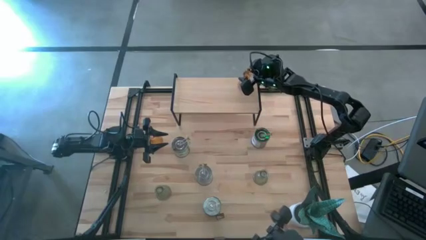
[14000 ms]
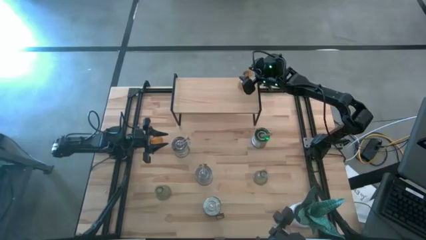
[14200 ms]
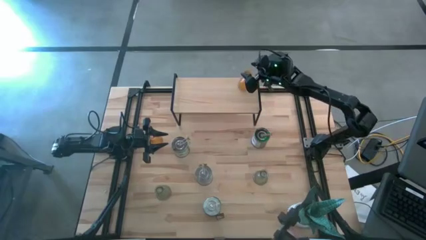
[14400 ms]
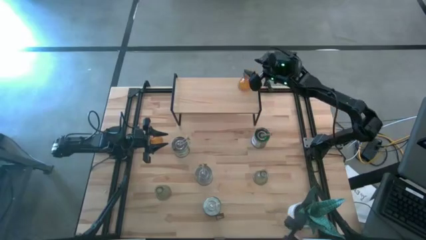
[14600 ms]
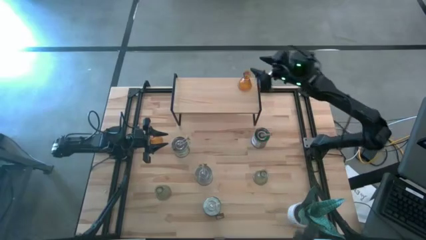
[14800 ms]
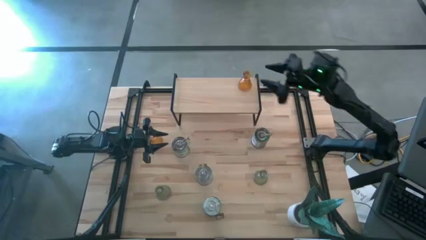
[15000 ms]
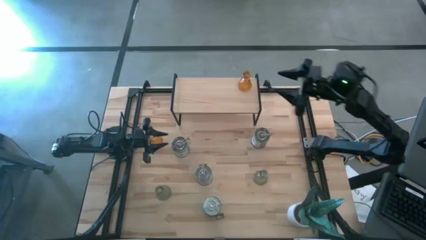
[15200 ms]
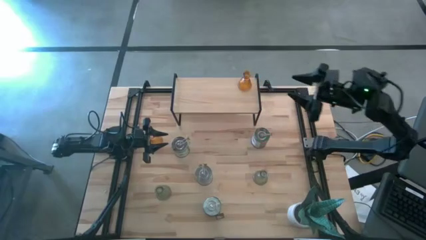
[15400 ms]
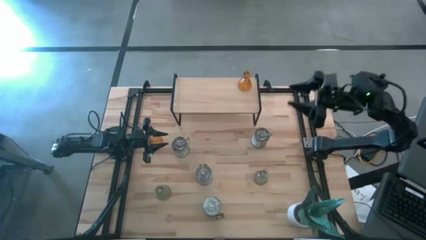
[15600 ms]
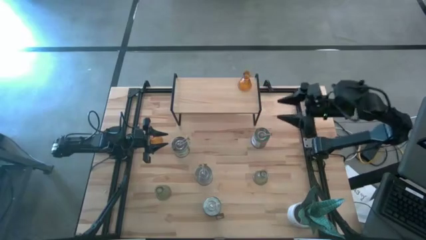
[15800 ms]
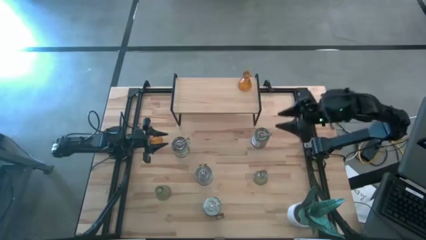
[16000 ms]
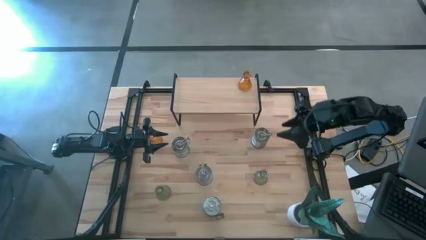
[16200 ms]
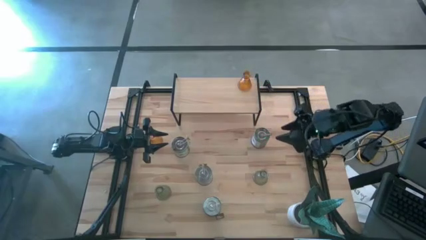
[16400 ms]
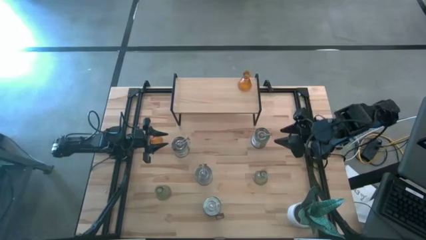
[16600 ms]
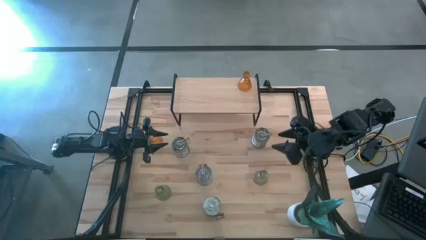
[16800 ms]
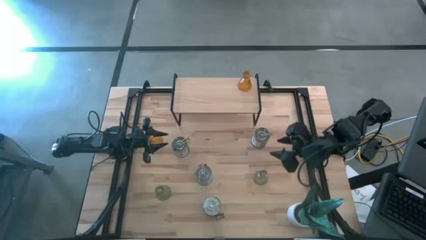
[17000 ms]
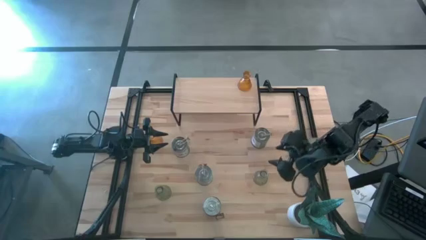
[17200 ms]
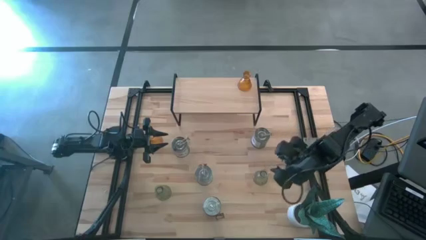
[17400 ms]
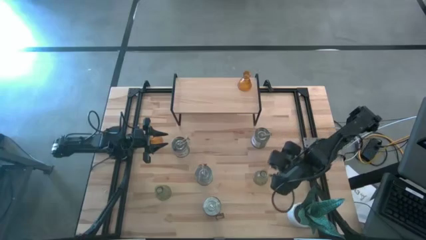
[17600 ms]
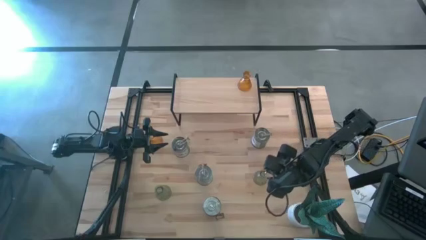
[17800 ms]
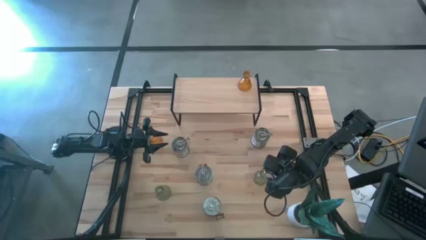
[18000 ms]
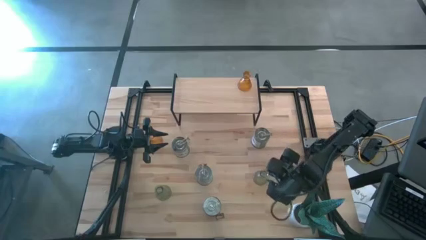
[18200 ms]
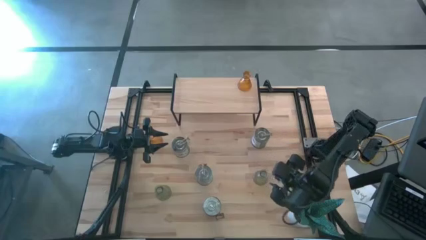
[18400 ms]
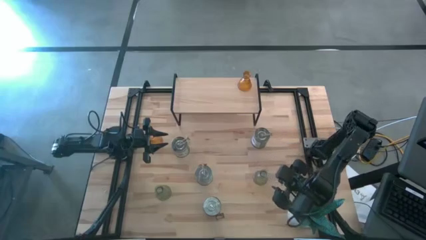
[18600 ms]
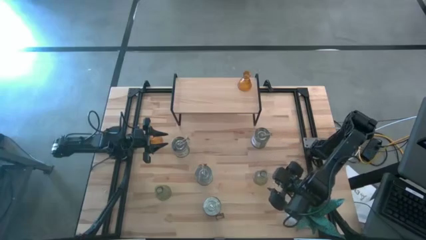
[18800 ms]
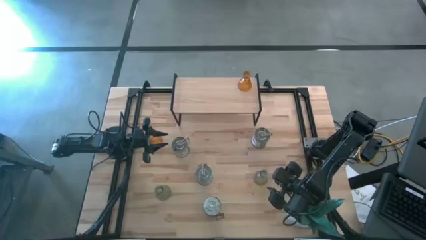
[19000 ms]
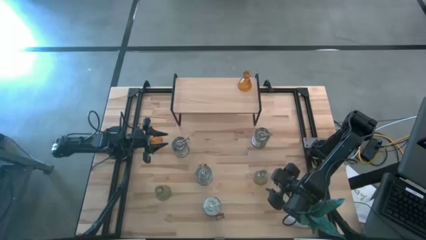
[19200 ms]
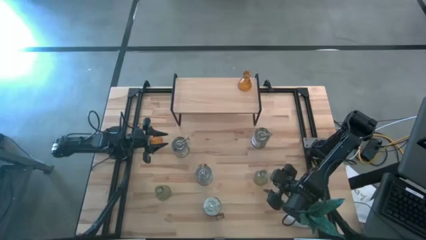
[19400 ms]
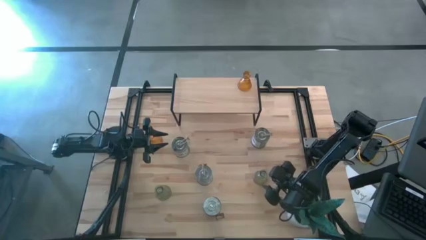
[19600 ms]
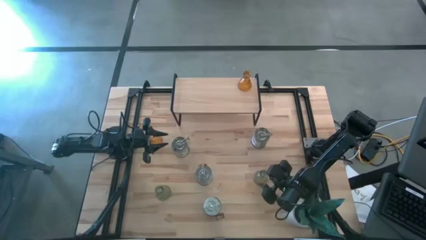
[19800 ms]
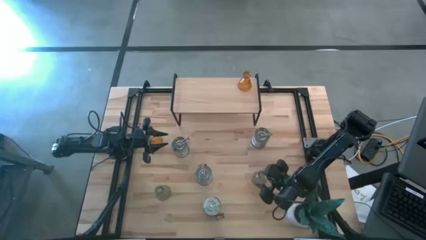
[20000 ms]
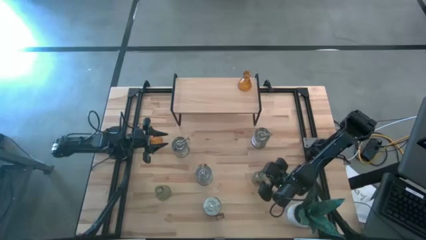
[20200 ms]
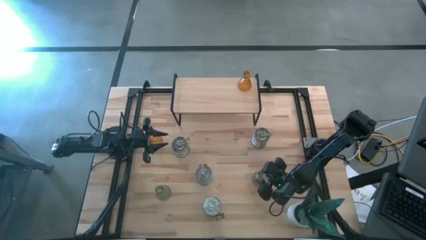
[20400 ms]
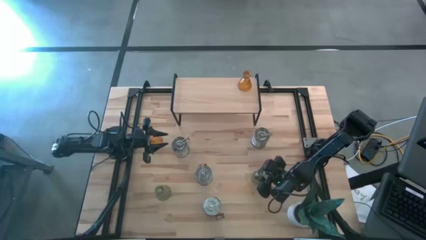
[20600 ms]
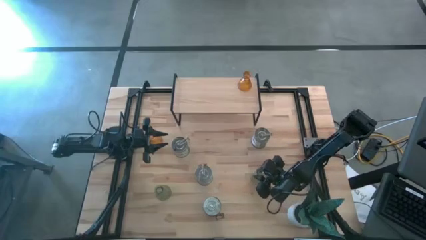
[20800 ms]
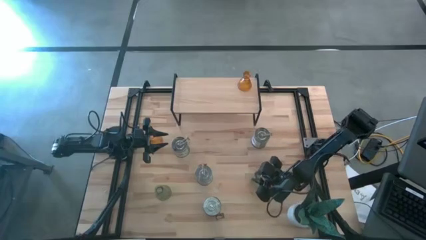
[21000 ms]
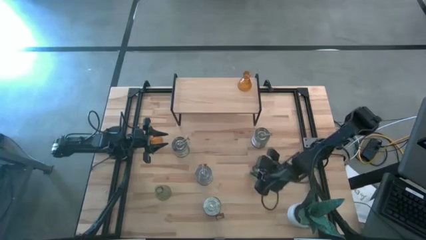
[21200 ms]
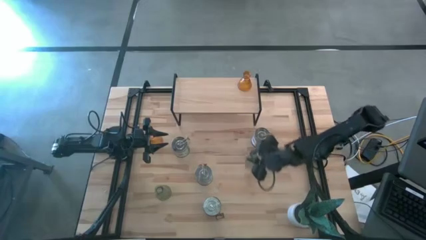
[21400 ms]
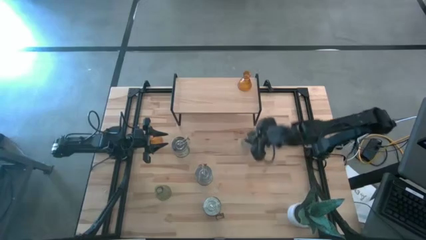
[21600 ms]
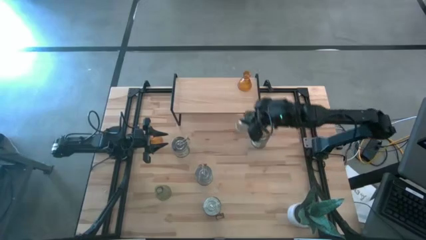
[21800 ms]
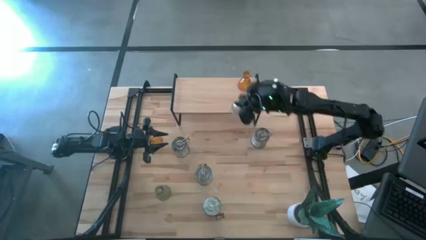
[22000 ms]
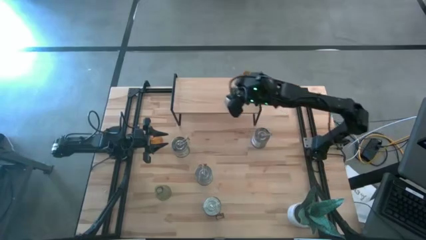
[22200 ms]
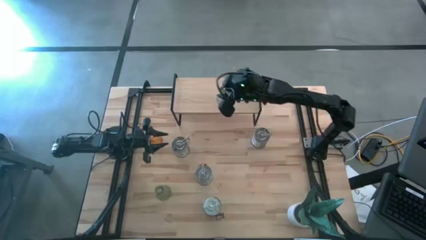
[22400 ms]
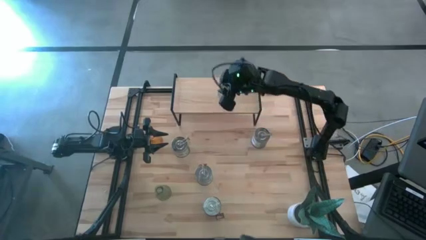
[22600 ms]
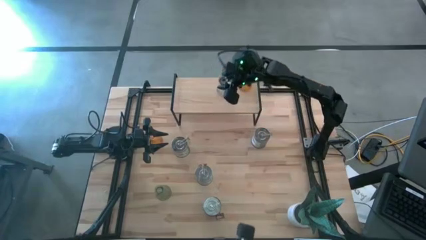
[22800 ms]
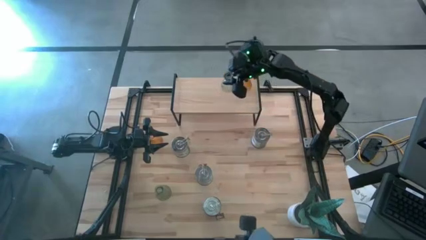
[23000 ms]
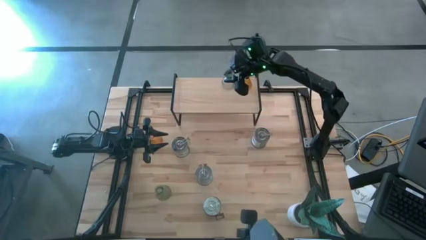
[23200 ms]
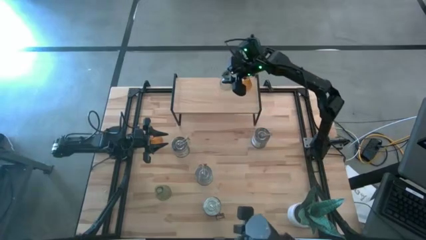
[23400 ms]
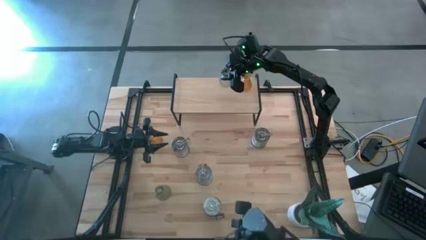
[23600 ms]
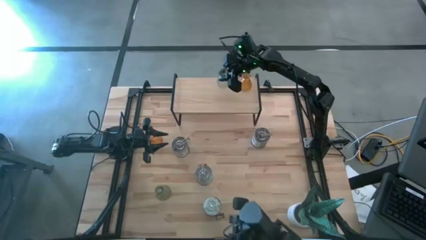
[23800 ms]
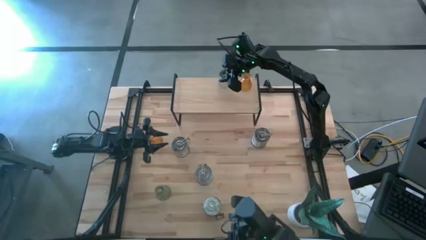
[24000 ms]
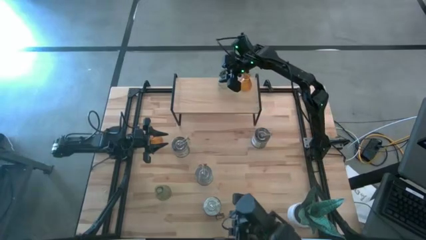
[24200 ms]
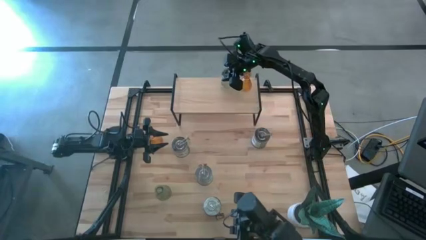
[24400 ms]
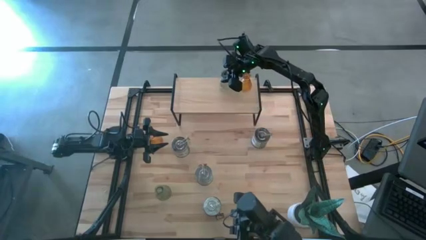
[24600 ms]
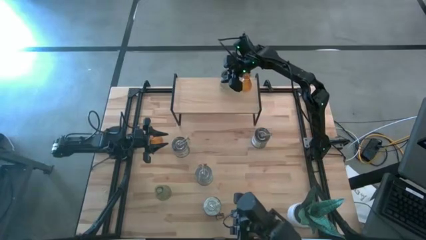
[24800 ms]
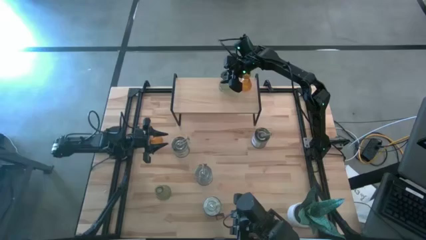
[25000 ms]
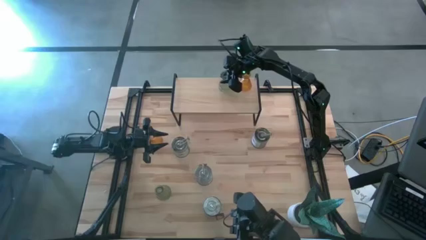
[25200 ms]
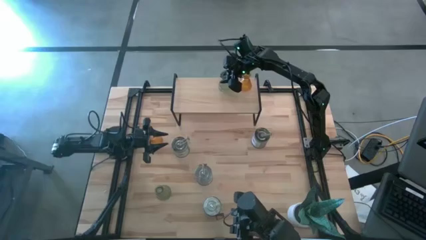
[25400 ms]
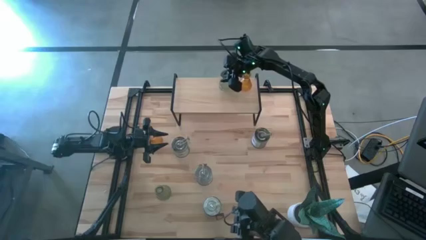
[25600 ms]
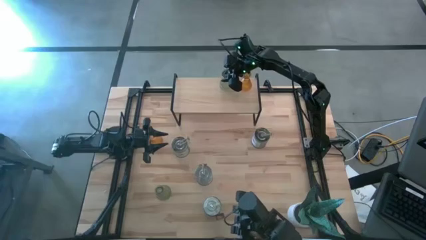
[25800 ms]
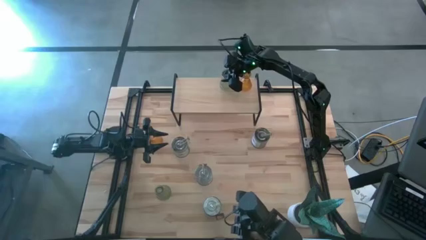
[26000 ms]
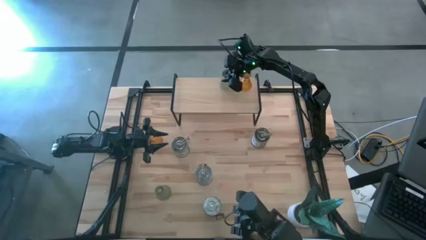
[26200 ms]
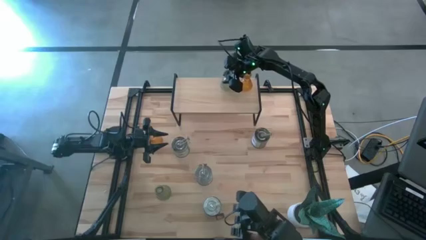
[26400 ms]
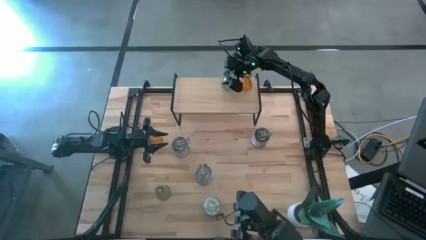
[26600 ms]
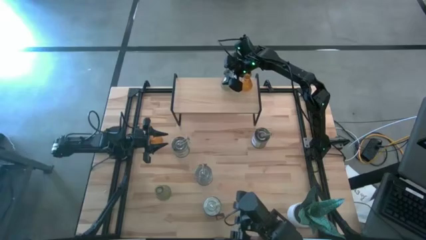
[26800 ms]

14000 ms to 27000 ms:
Task: Pick & Place candle stick holders
Put the right green candle holder on the shelf aligned with the orange candle holder

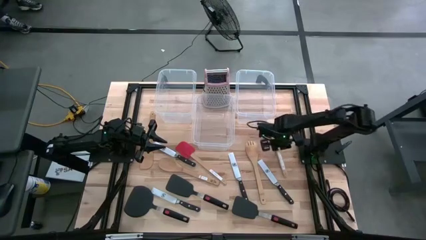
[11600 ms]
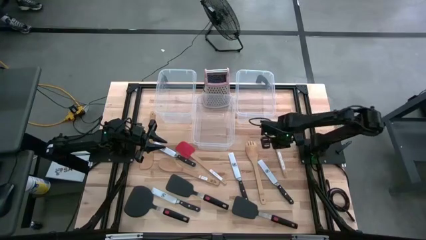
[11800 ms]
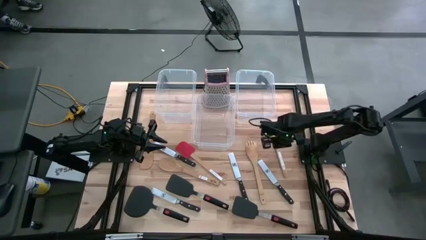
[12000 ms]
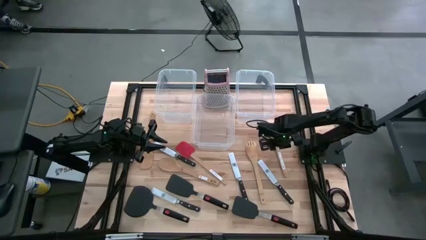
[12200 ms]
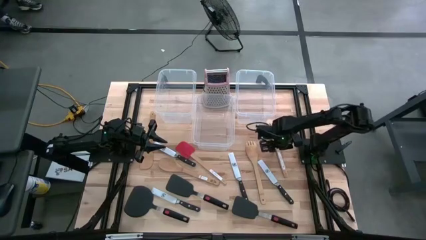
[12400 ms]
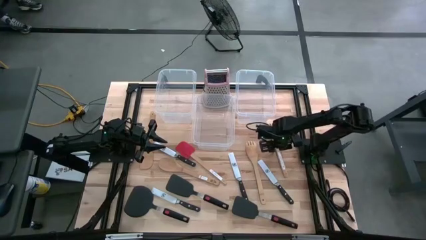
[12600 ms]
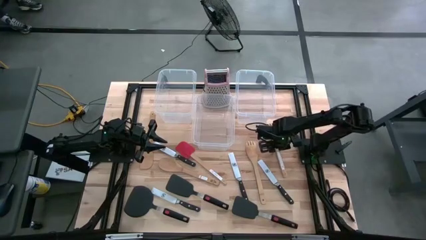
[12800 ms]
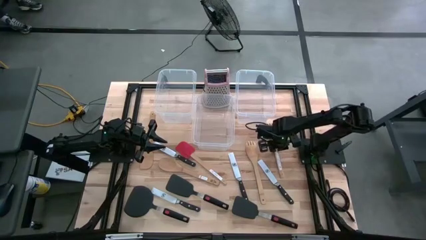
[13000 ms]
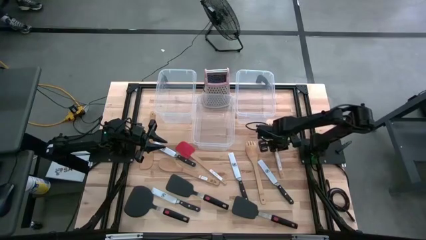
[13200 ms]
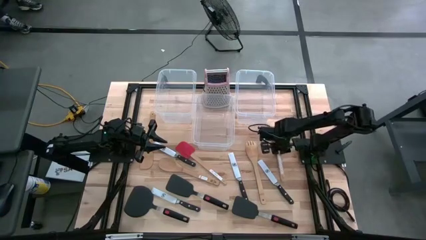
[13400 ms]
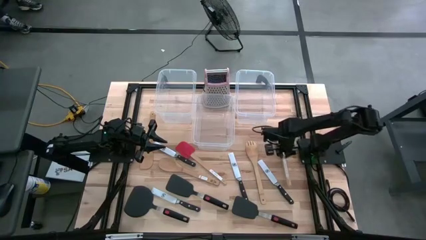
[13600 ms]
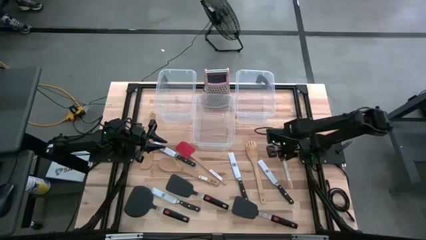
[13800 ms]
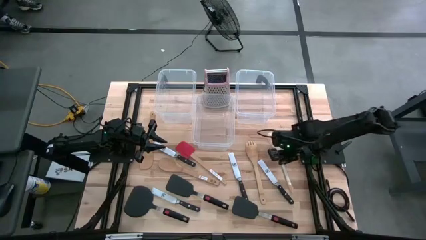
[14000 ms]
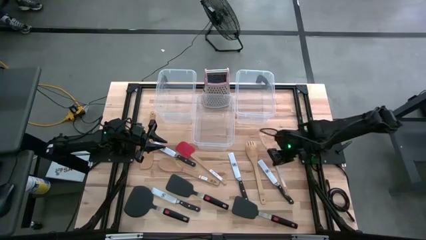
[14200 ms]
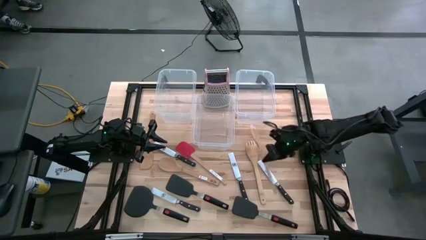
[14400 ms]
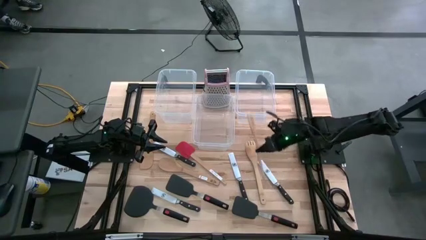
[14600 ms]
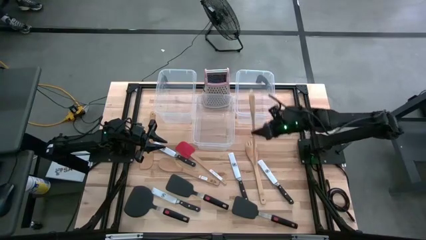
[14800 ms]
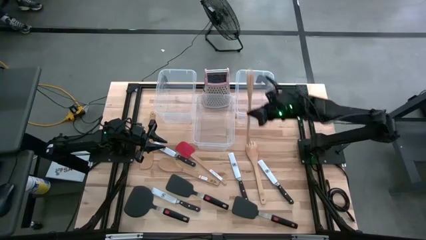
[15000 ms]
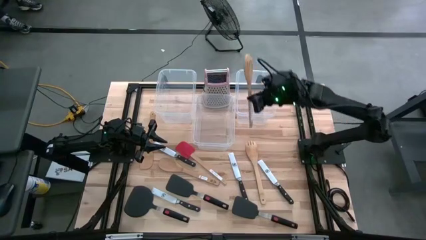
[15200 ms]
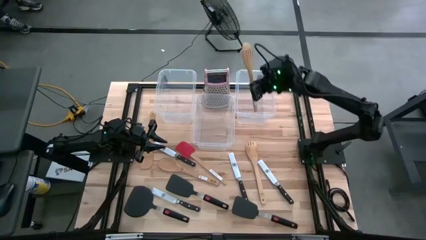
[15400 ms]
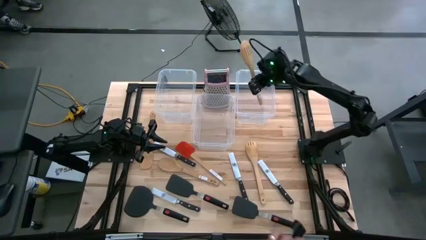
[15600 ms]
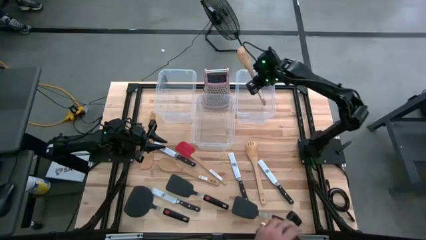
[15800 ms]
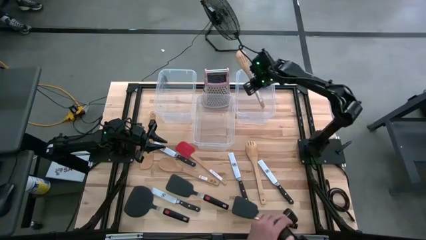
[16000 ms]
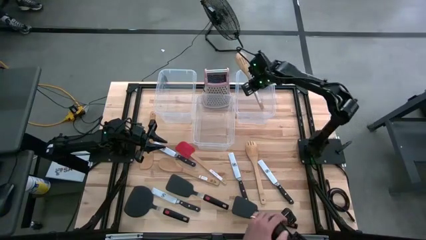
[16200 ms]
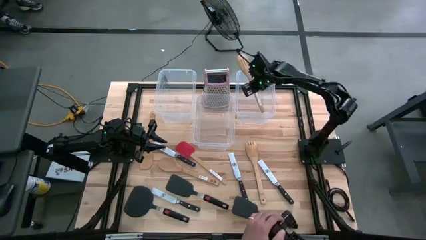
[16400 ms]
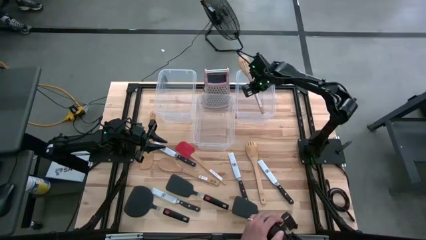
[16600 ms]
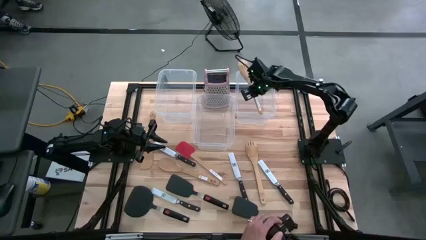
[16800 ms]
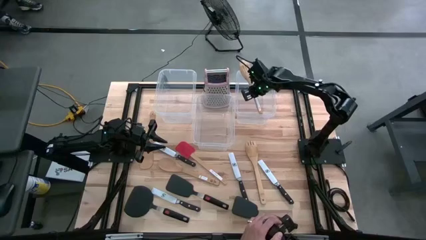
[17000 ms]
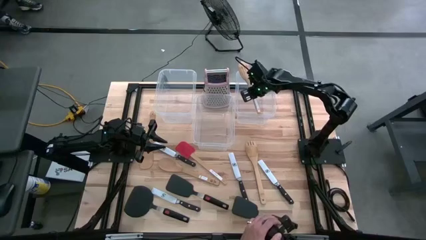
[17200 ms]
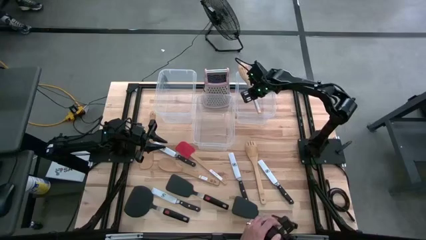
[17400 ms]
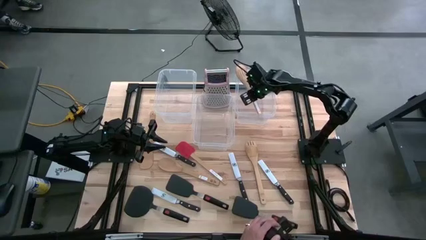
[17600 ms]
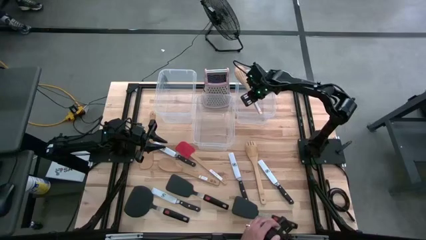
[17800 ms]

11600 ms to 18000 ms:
Task: Pick & Place Kitchen Items
Put the brown serving spoon into the right transparent bin
